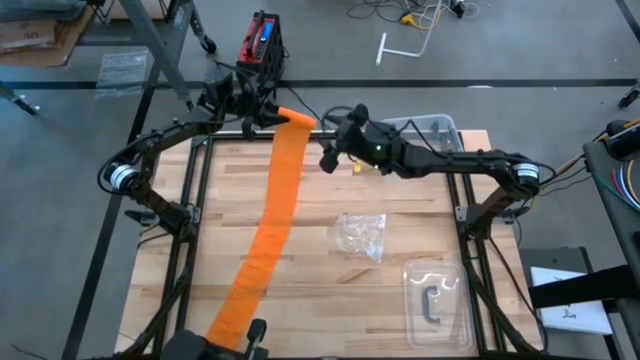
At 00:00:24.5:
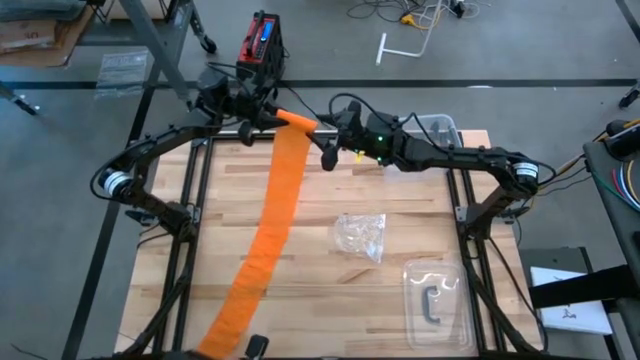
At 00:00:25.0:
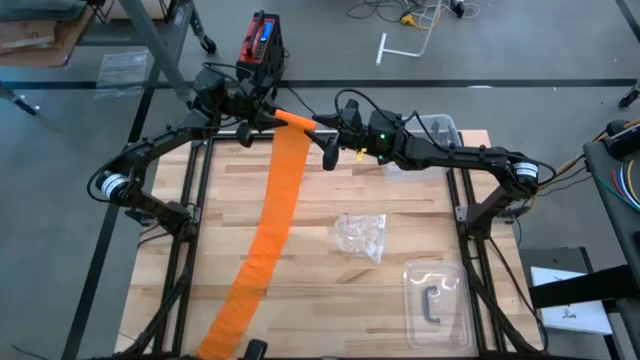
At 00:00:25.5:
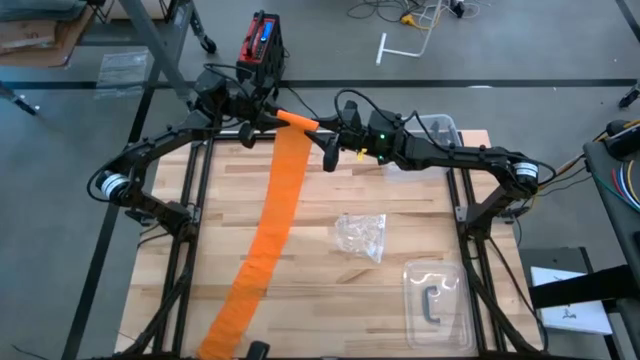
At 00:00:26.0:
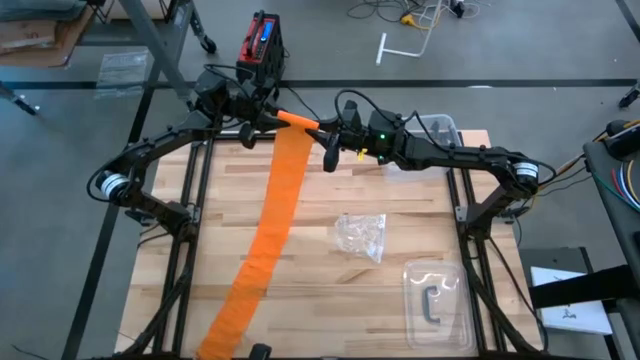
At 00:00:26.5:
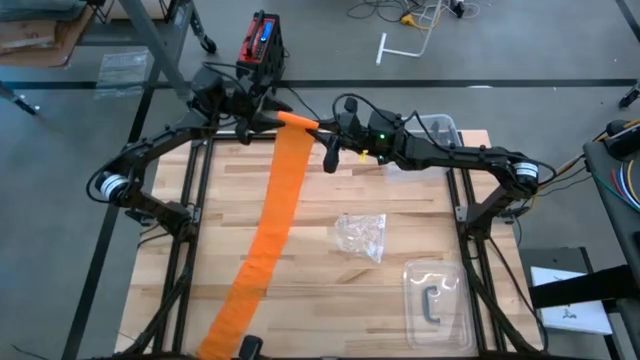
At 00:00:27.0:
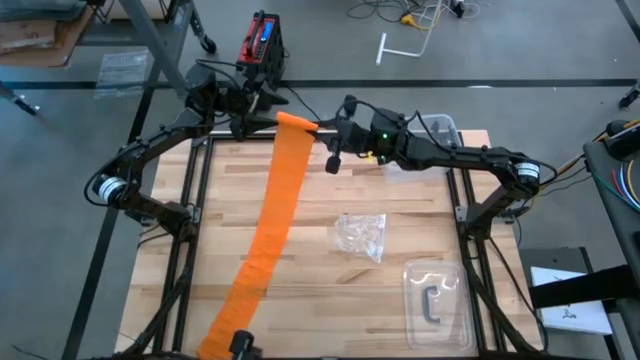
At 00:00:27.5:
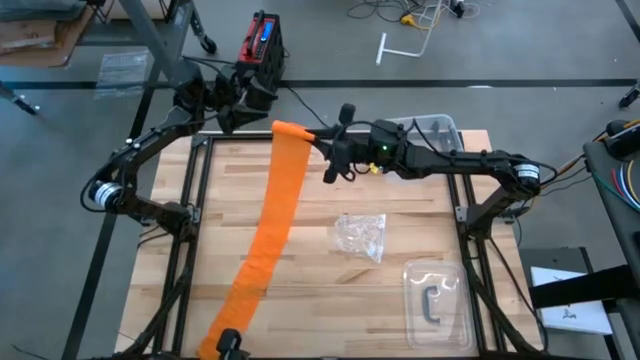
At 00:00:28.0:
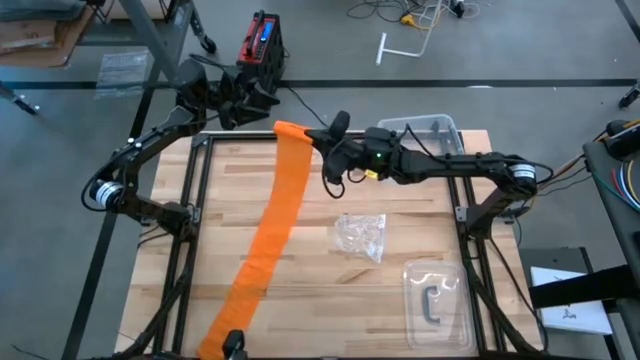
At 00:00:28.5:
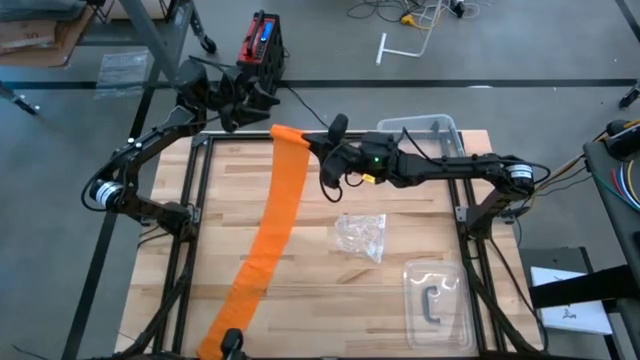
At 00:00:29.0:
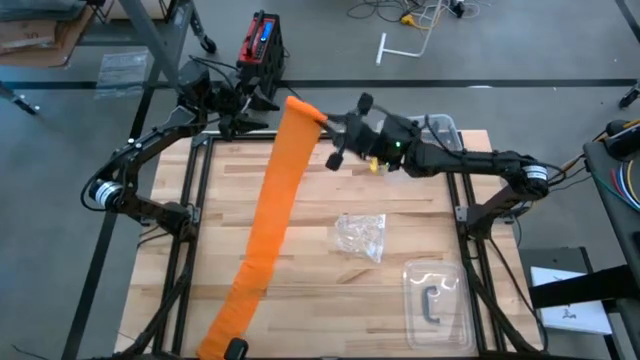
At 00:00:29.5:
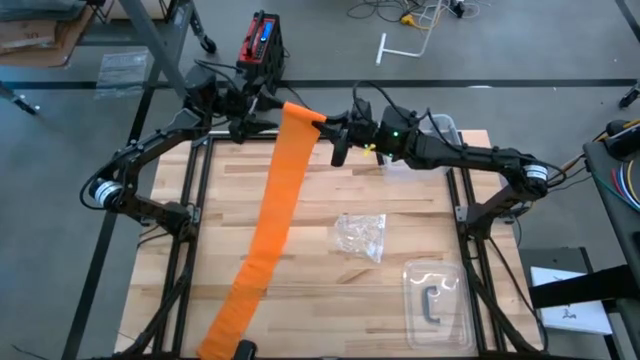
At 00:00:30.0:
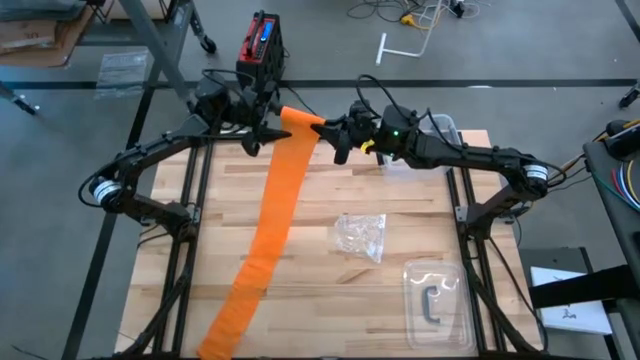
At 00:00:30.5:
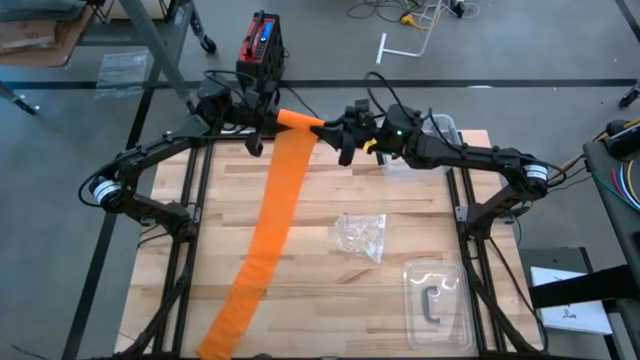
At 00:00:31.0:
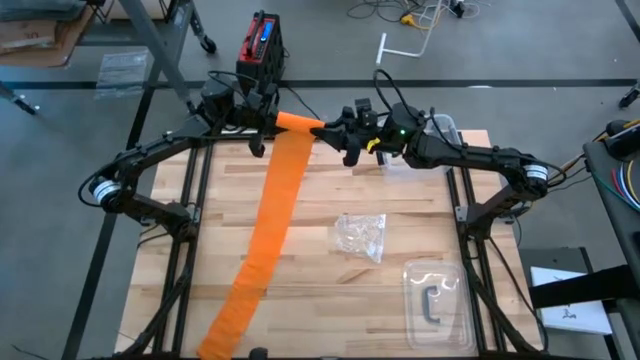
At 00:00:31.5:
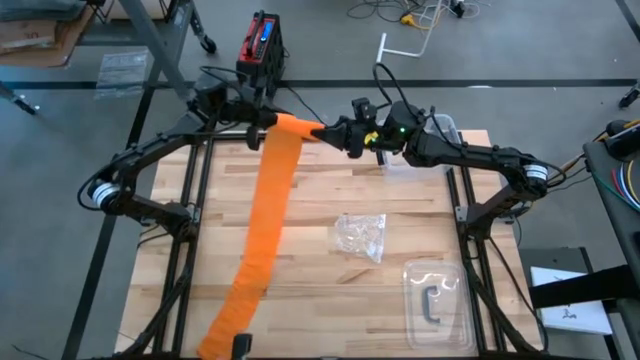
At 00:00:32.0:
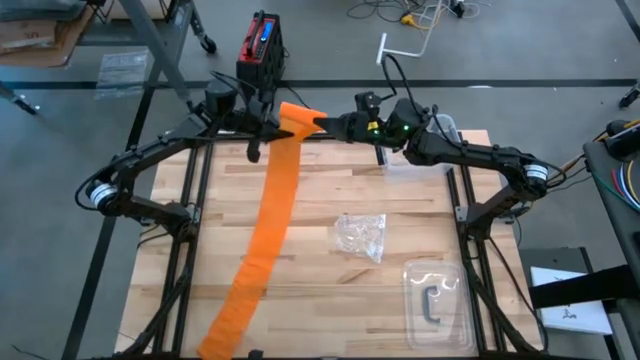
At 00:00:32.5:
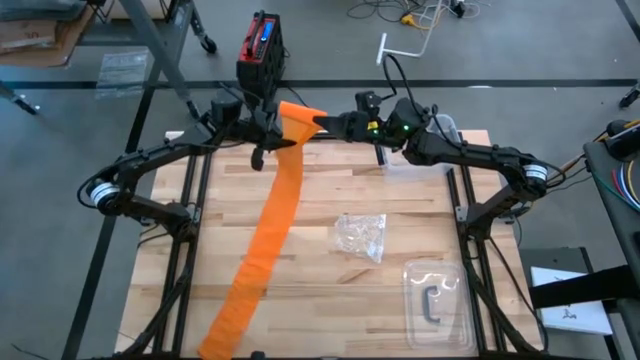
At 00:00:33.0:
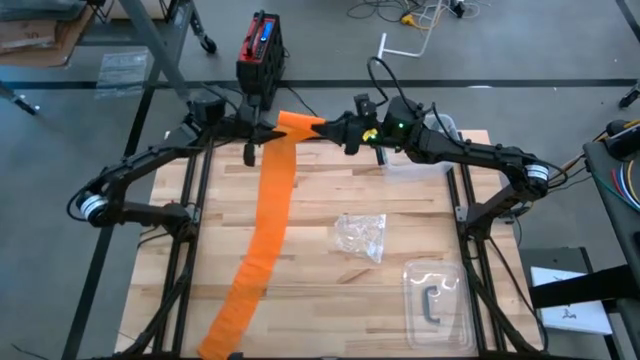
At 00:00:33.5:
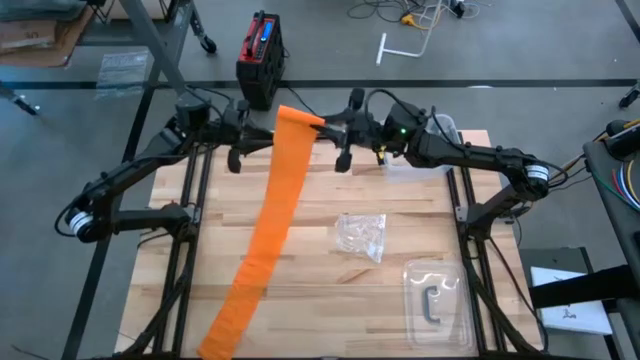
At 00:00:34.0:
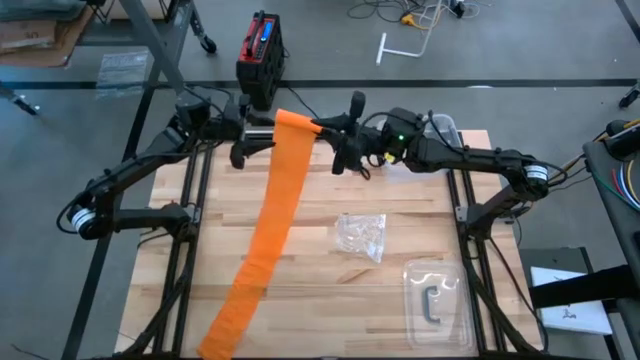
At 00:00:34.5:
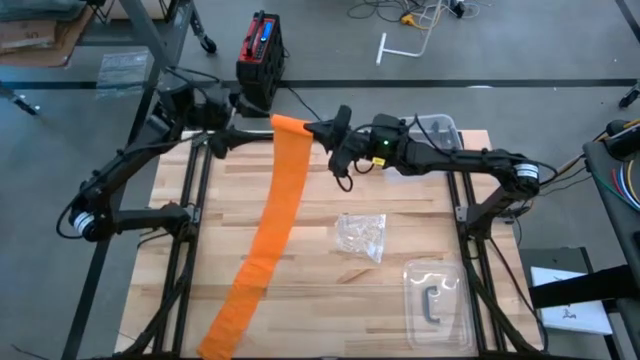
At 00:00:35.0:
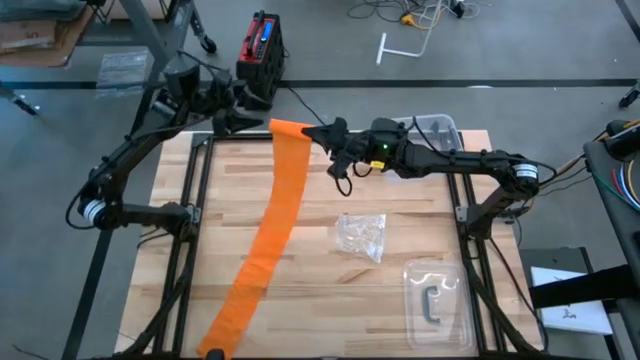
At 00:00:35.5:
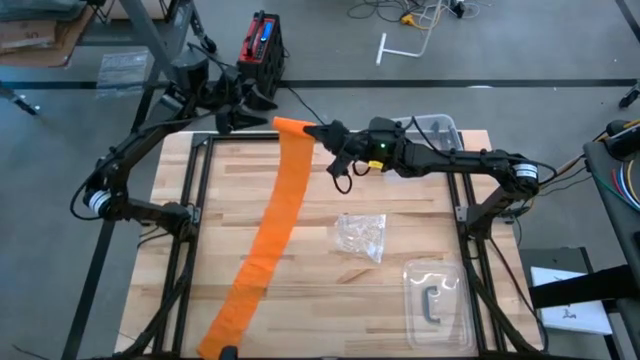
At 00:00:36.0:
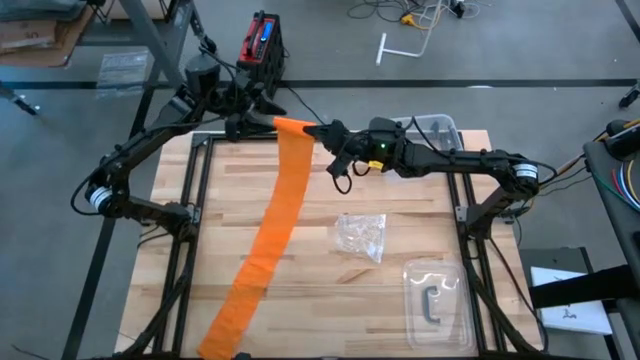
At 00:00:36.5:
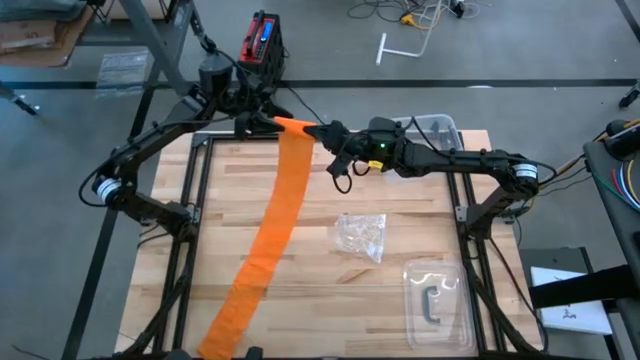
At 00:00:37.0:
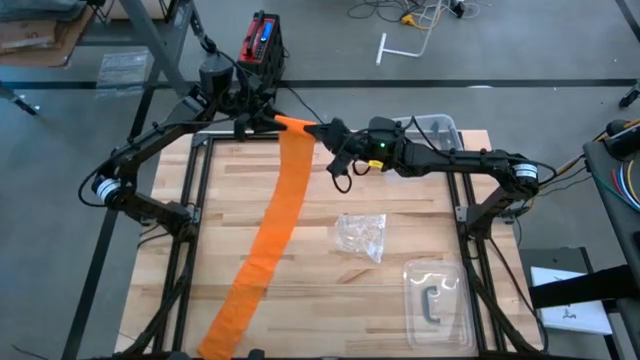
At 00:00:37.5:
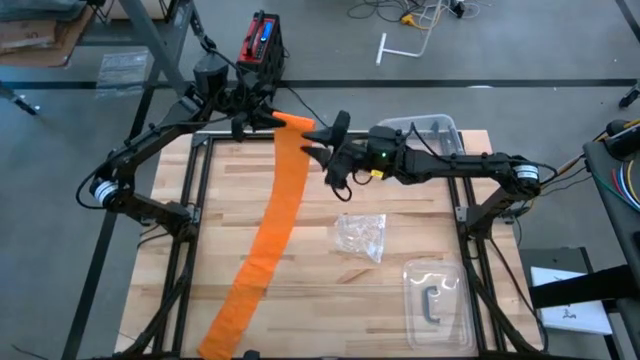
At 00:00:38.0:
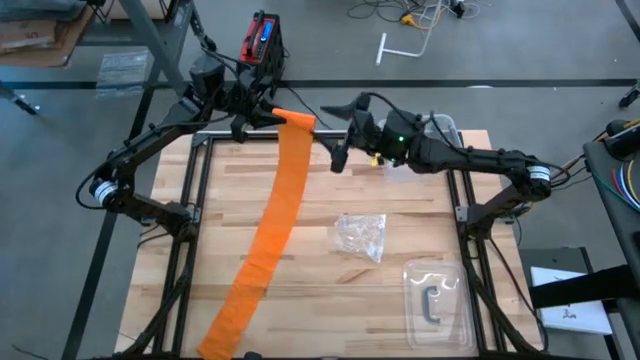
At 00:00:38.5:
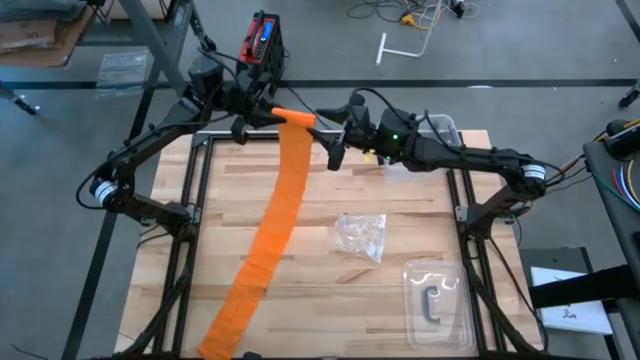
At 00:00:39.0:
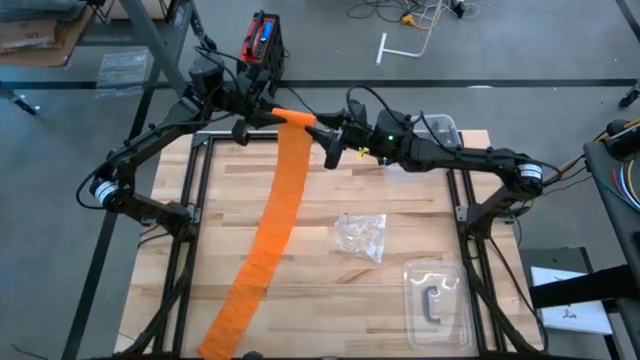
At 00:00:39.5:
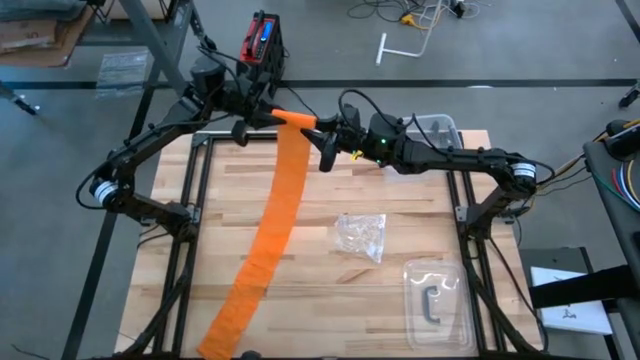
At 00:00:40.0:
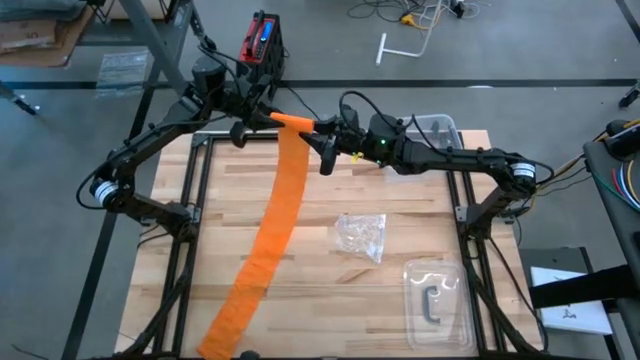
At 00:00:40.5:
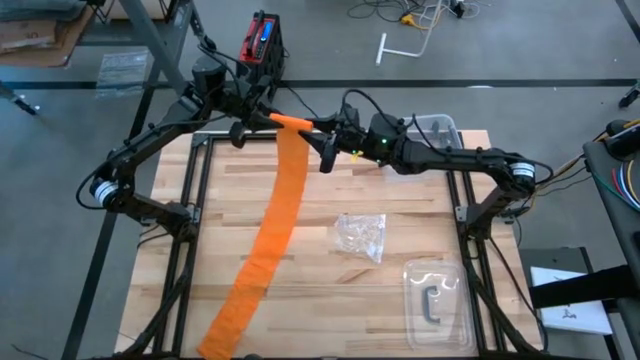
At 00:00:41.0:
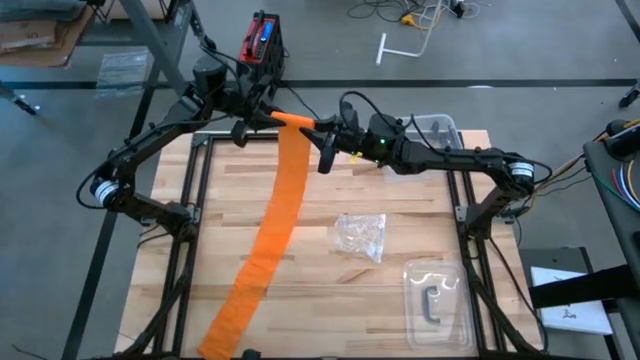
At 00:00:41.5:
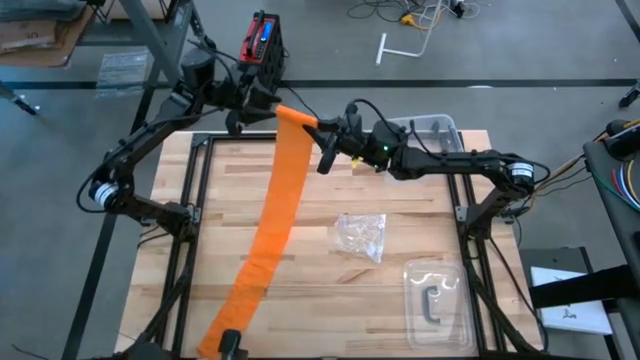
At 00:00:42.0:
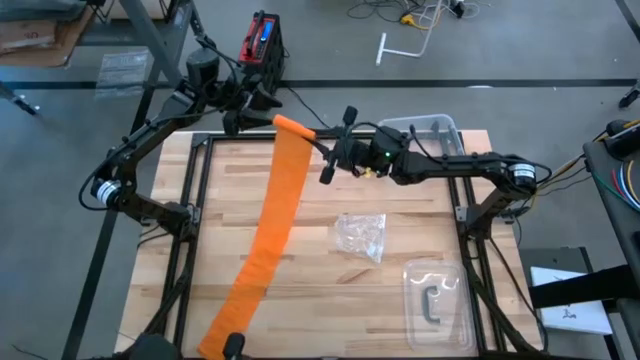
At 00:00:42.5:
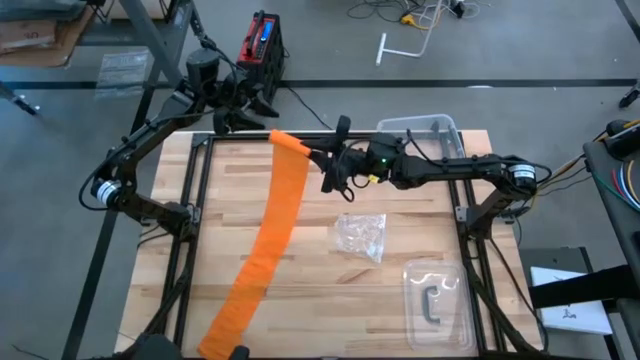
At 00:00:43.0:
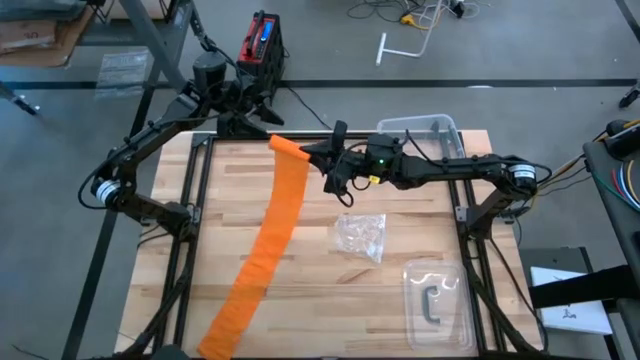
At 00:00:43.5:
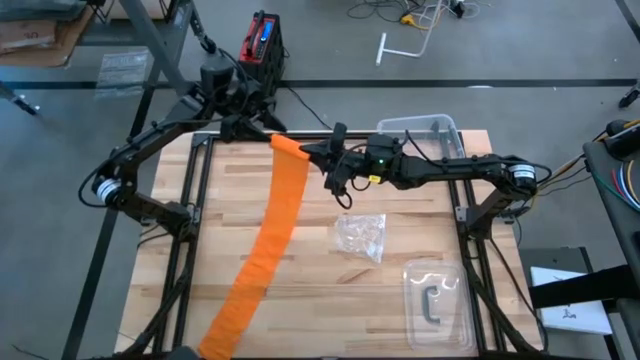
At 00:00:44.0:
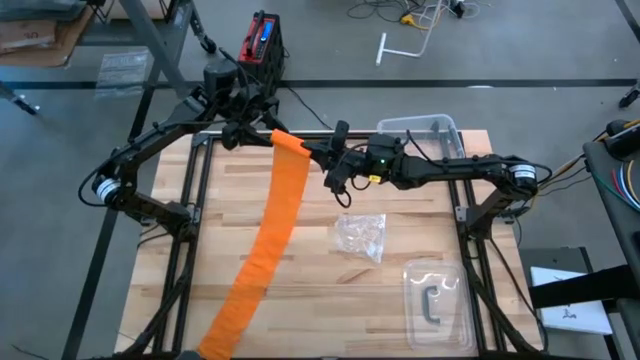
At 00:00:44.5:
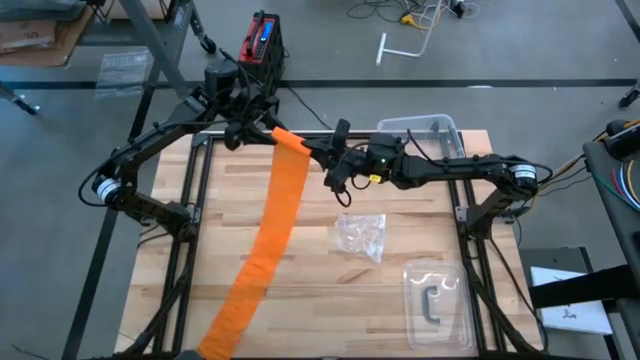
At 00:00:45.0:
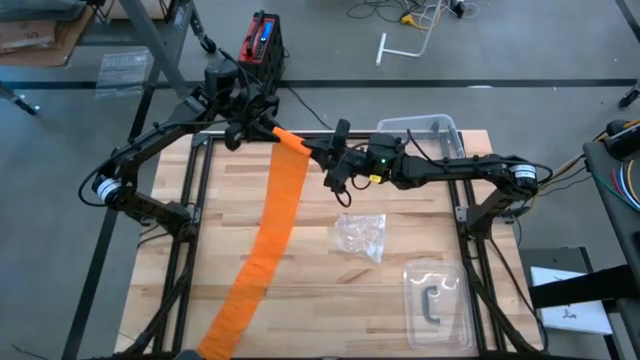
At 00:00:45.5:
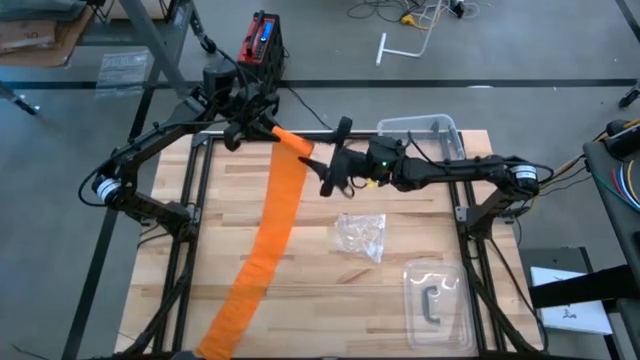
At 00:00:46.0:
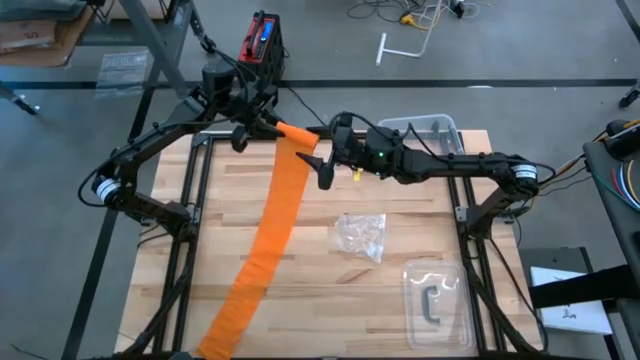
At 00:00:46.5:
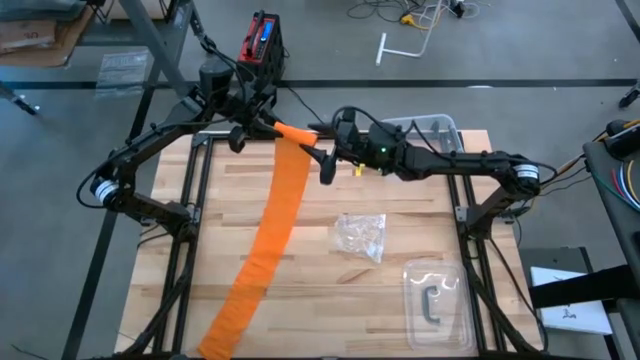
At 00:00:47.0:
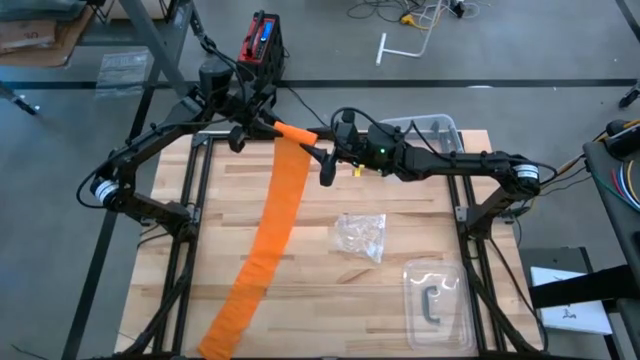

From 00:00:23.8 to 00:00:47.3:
Task: Roll bandage
Roll the orange bandage
